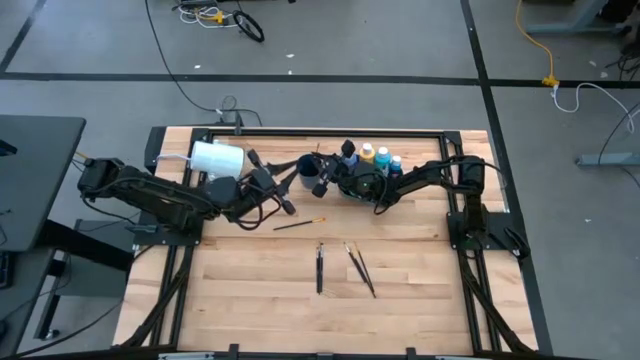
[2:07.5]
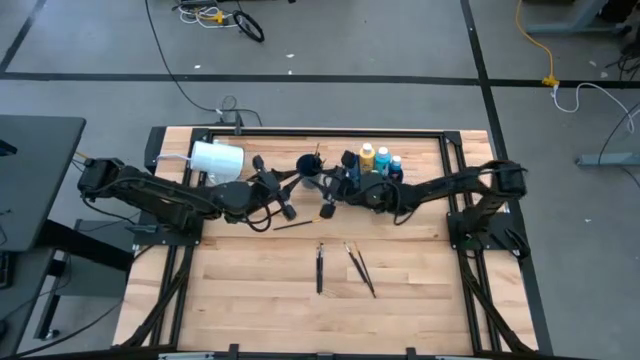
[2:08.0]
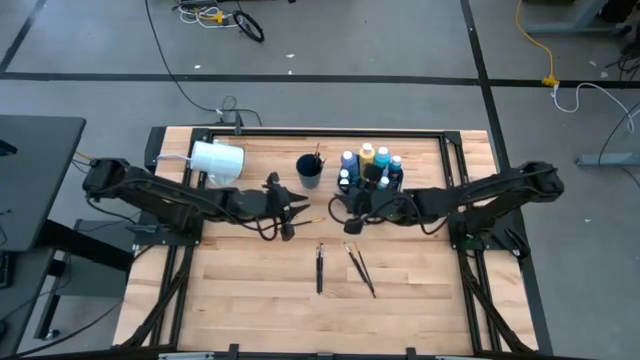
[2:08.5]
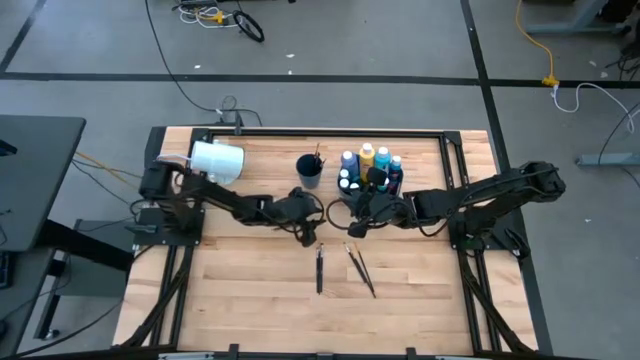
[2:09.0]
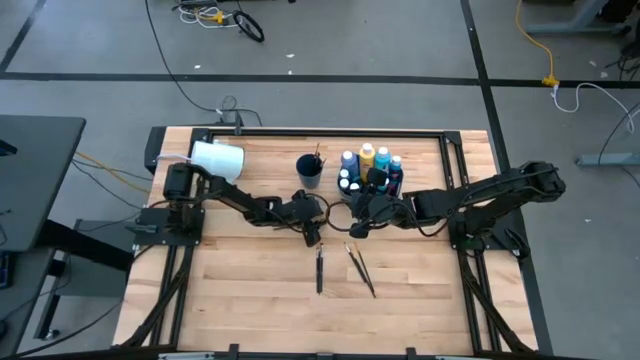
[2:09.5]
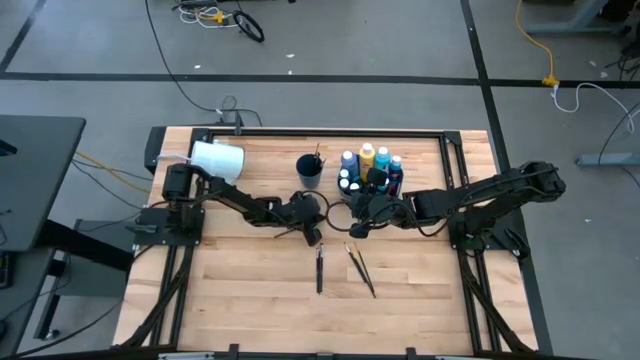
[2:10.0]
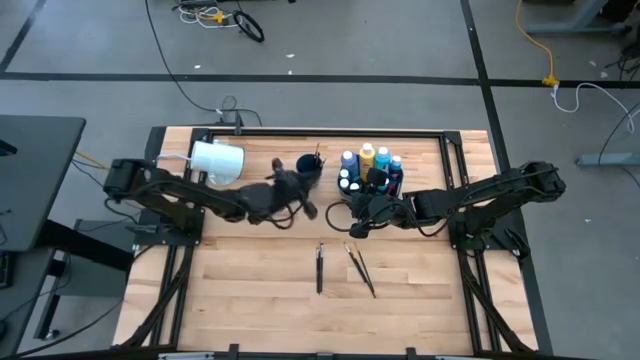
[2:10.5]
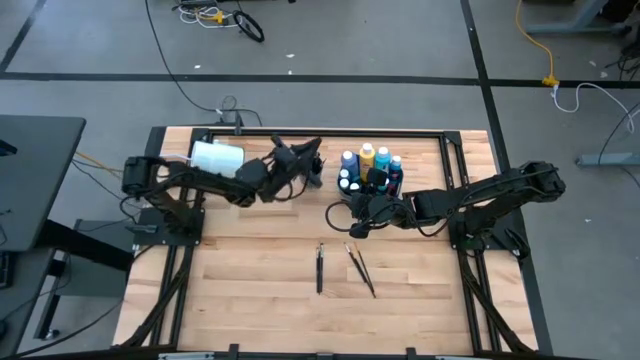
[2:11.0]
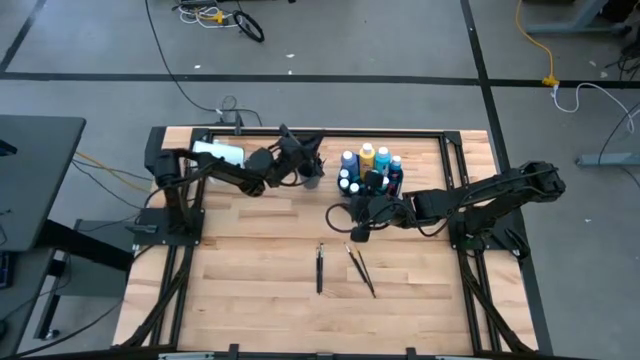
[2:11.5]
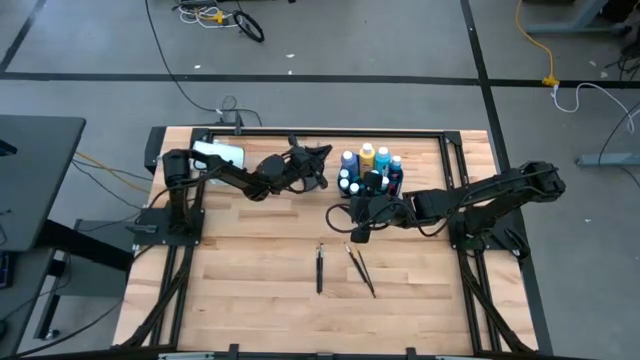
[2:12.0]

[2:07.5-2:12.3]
Task: Pick & Place Paint Supplies
Put the gold paint brush into the blue cup

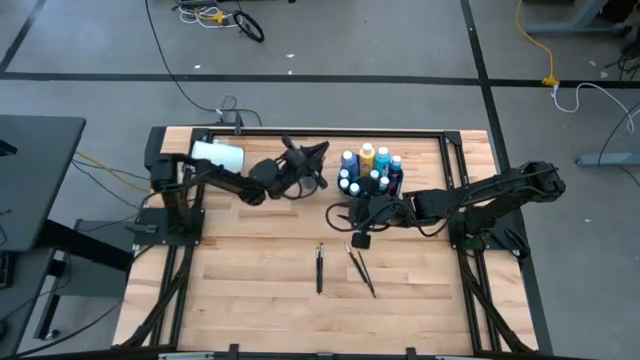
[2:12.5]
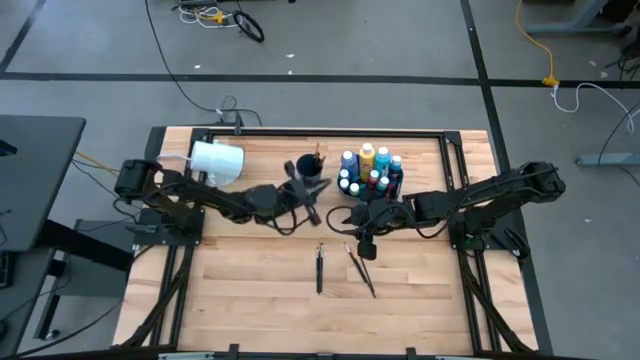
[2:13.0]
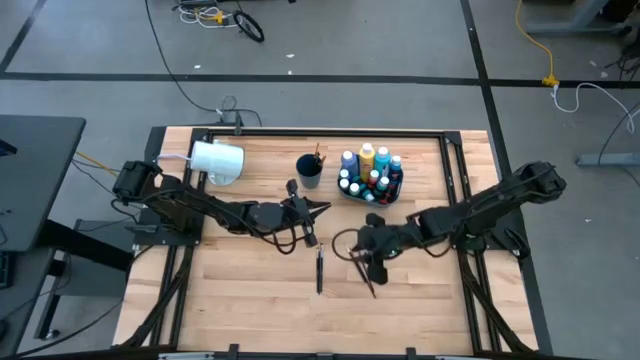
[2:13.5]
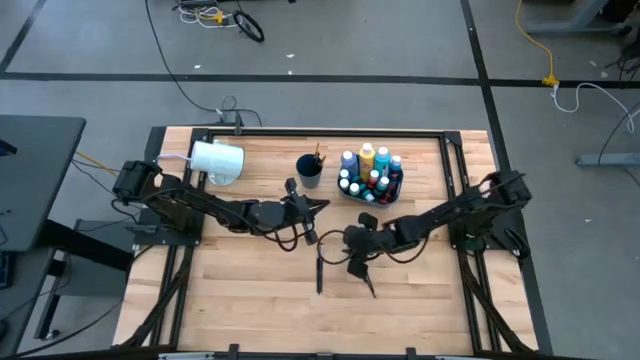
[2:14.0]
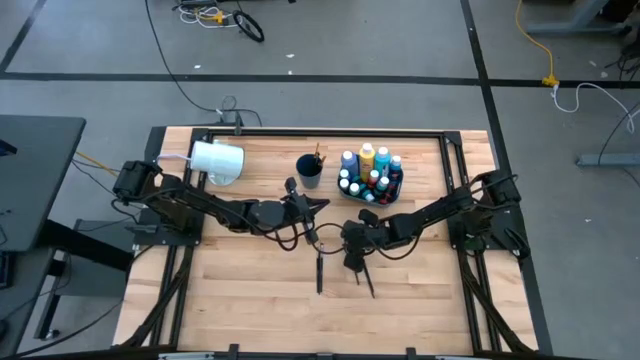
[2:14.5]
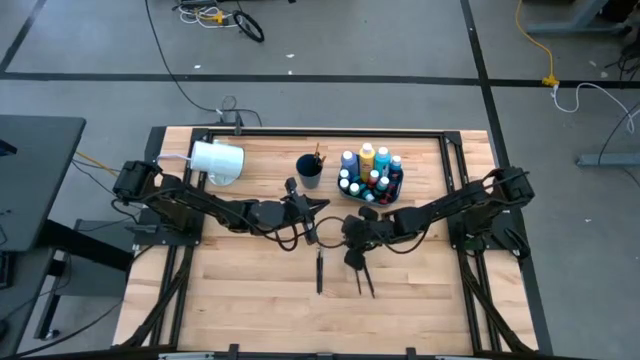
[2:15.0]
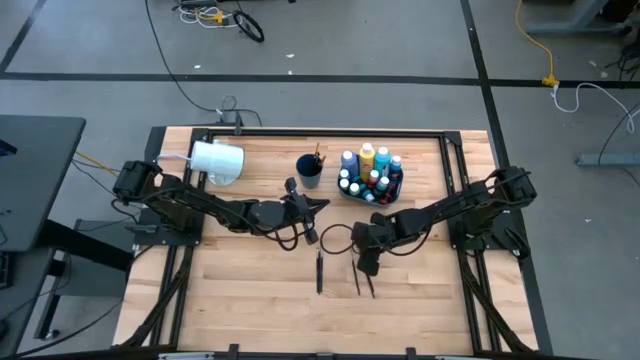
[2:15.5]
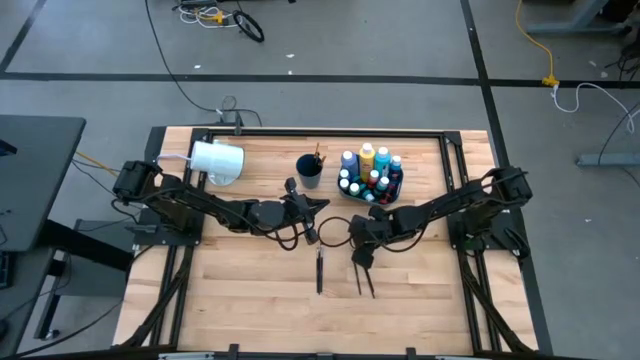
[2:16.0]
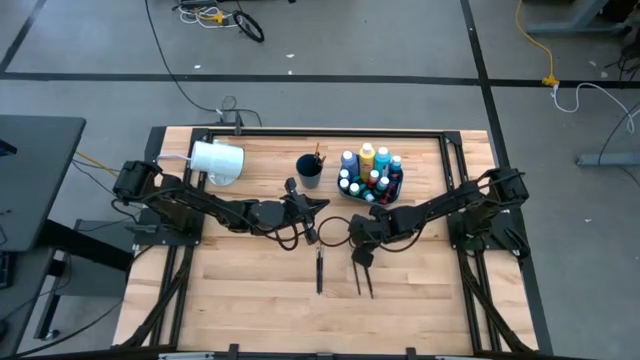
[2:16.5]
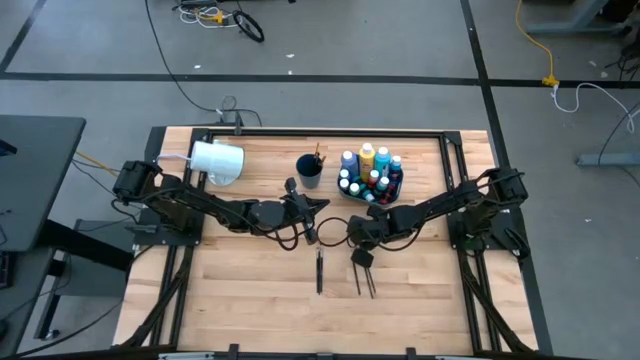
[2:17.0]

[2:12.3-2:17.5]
Put the gold paint brush into the blue cup

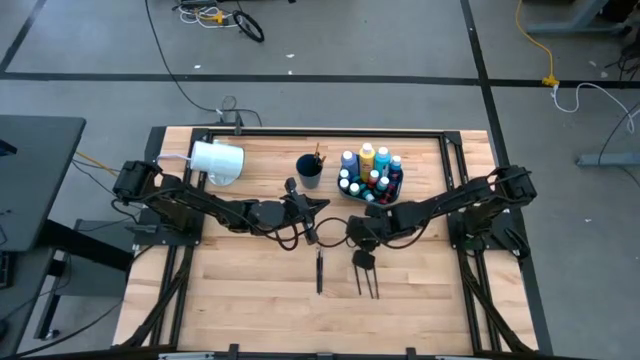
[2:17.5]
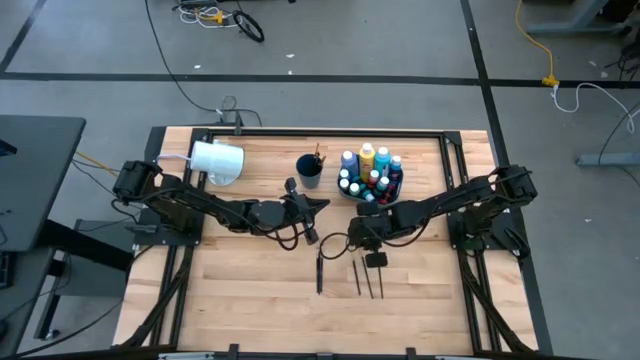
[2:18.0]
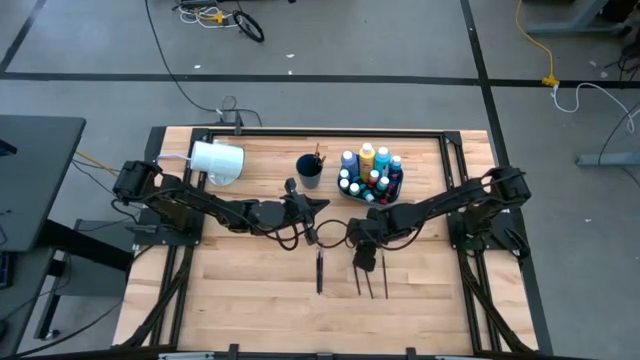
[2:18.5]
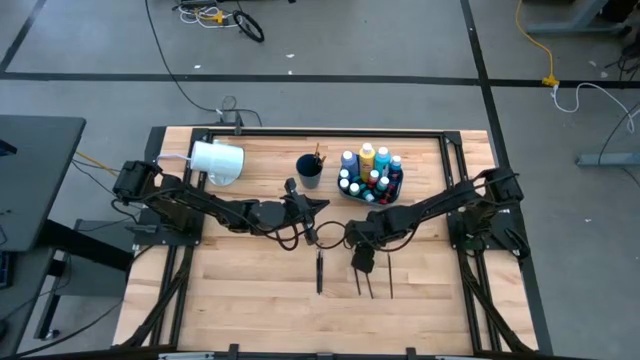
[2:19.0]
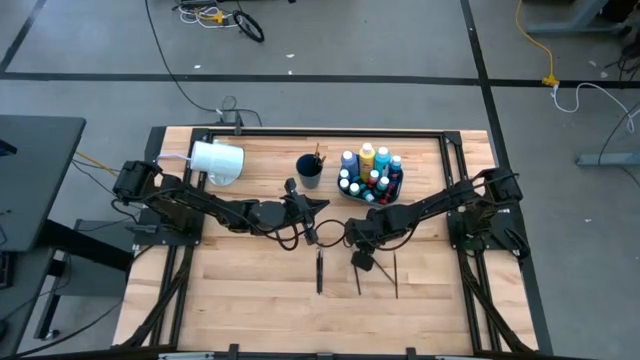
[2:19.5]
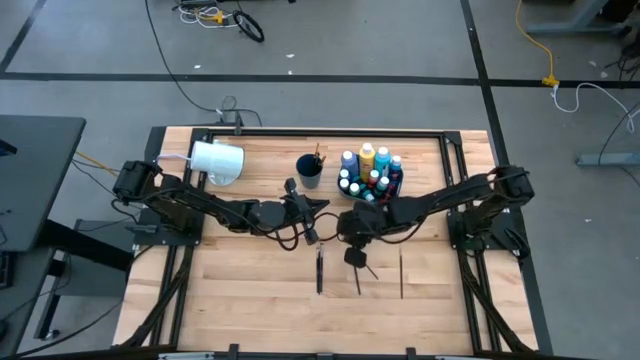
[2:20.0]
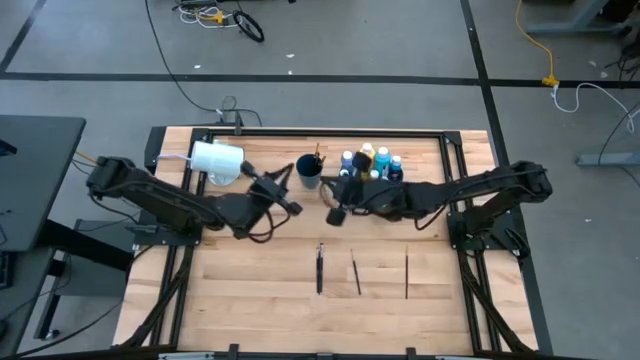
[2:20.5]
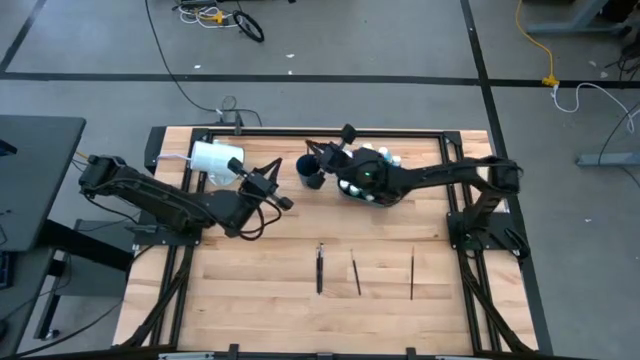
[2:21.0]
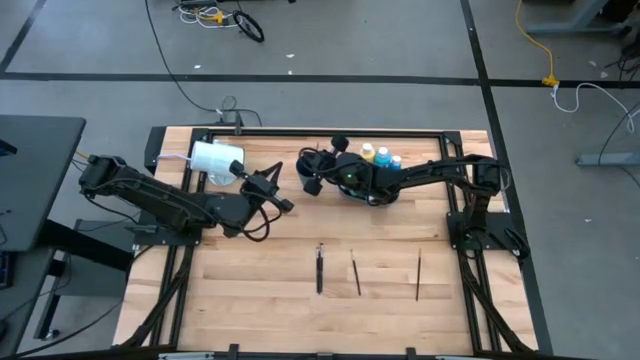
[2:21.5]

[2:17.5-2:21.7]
Put the gold paint brush into the blue cup

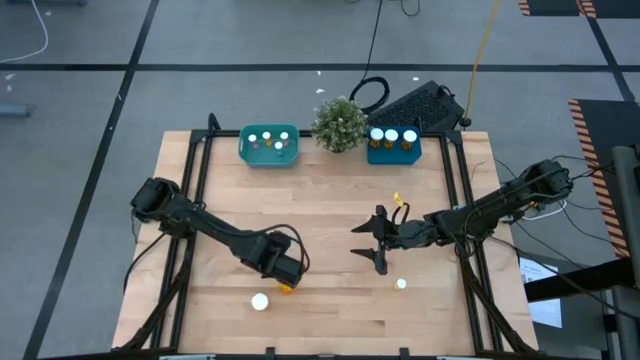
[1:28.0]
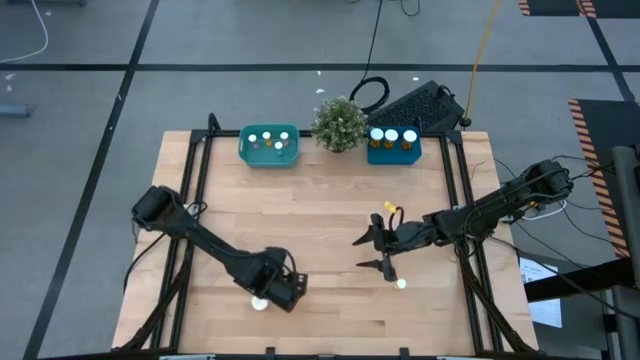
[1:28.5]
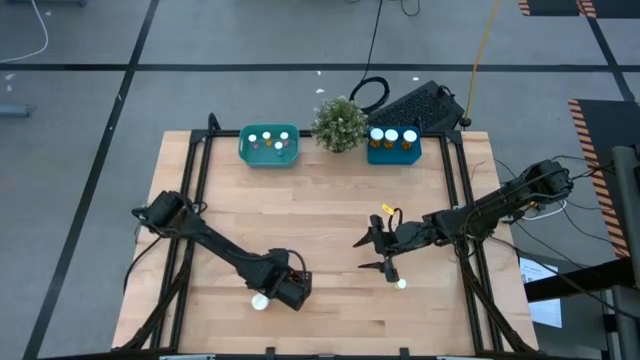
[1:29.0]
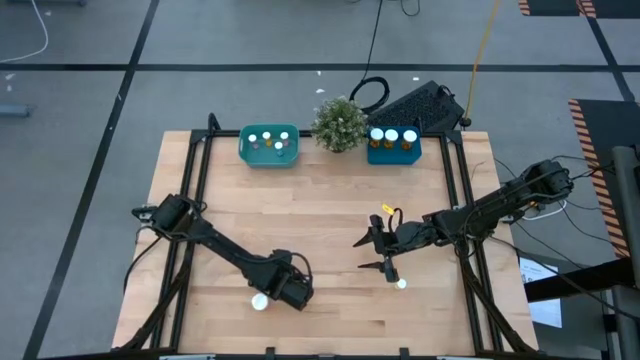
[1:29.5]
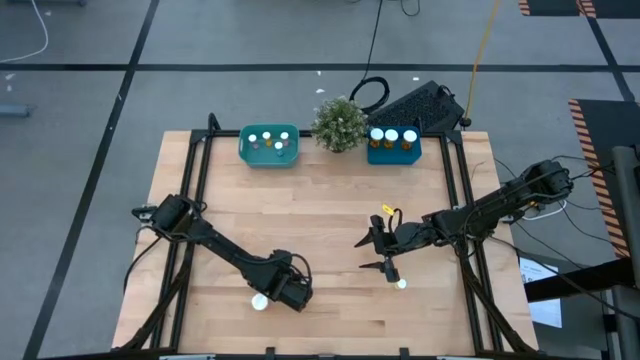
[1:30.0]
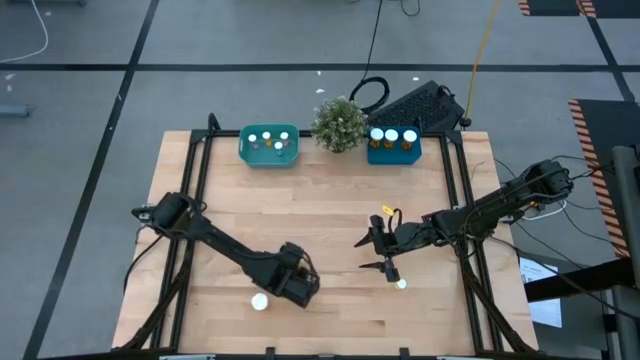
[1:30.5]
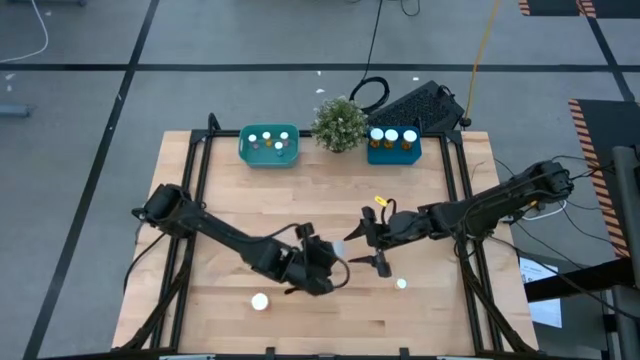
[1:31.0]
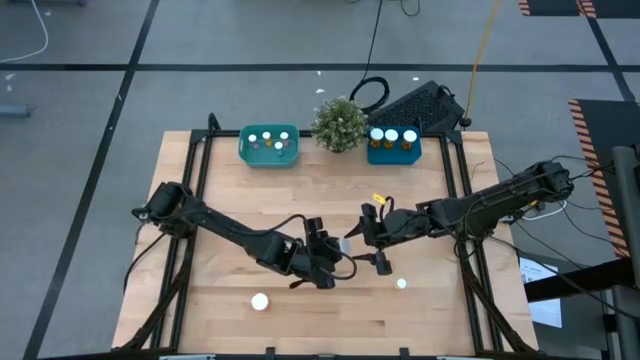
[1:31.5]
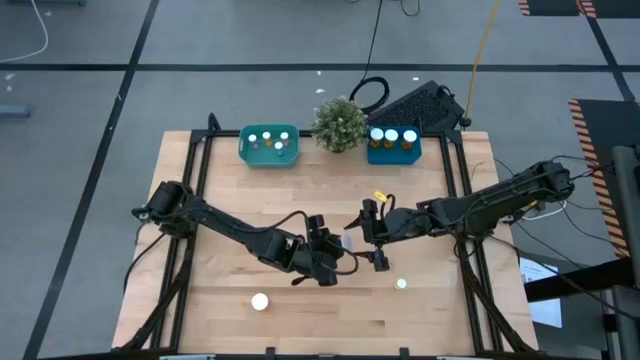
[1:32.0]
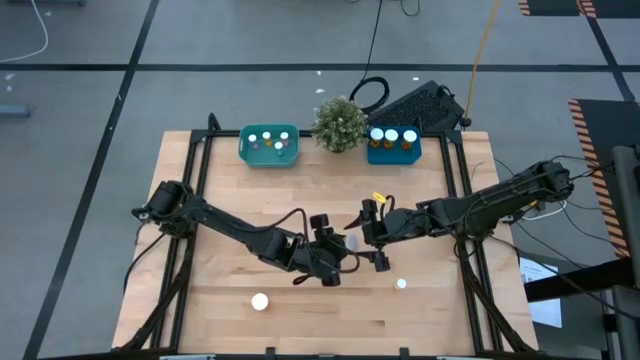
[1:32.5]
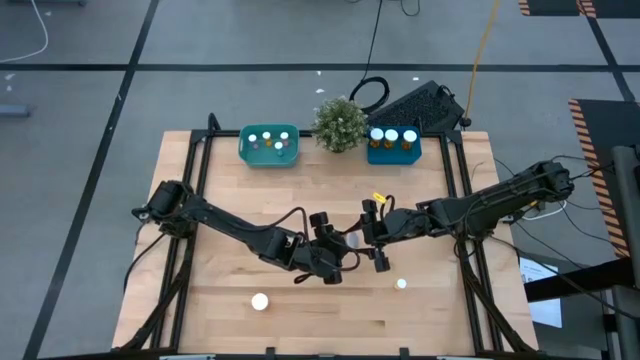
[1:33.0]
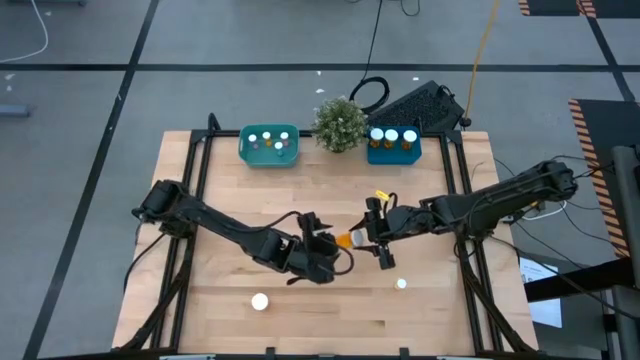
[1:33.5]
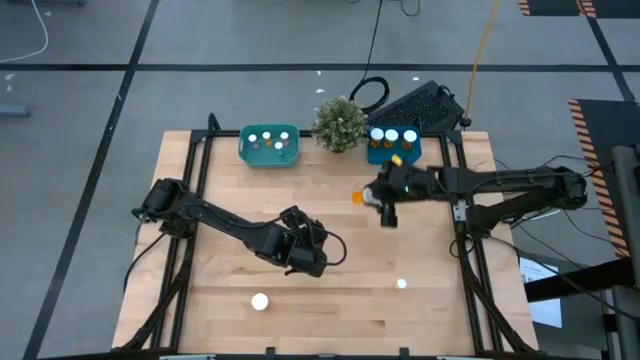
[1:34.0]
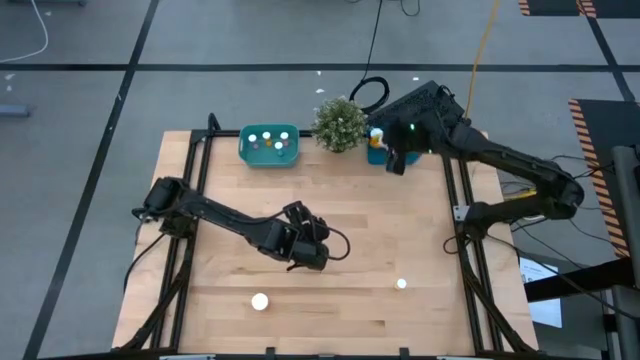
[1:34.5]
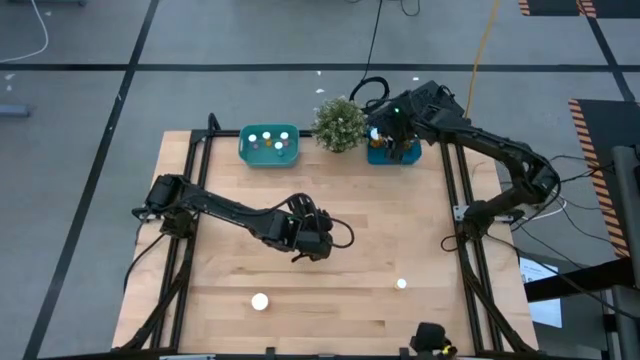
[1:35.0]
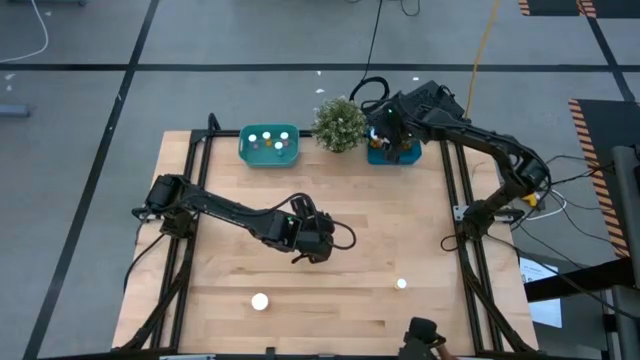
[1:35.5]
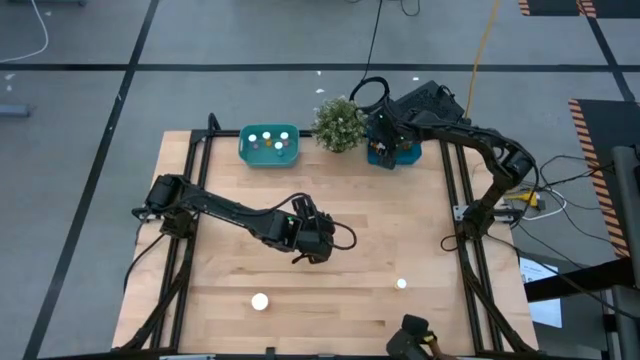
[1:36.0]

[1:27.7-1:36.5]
Task: Pick and place medicine bottles into bin by pill shape (circle, oval)
Put the big orange pill bottle into the blue bin
